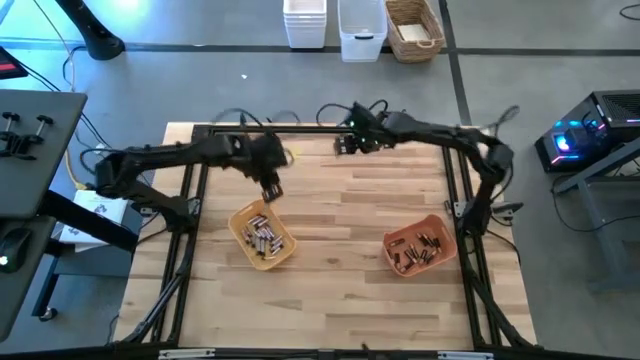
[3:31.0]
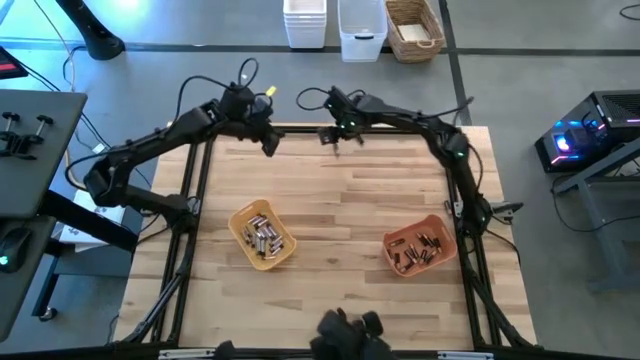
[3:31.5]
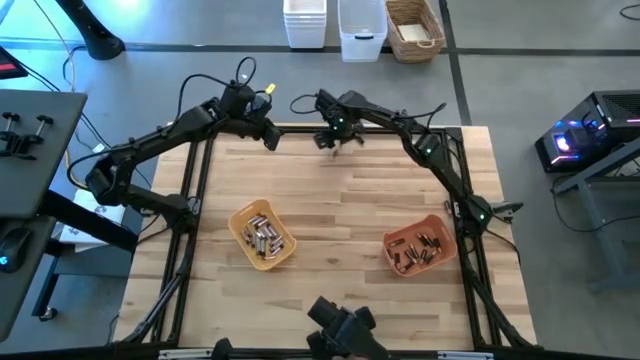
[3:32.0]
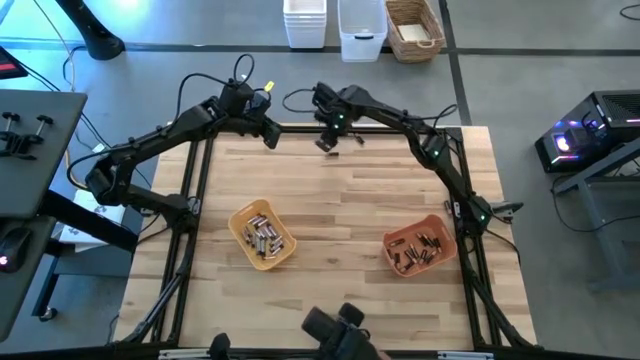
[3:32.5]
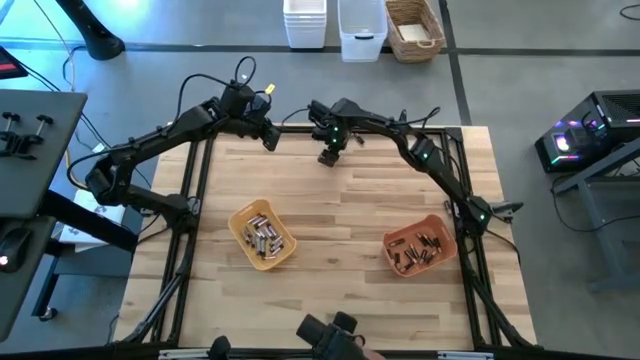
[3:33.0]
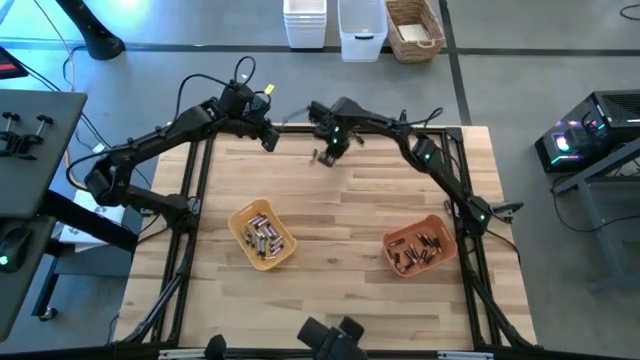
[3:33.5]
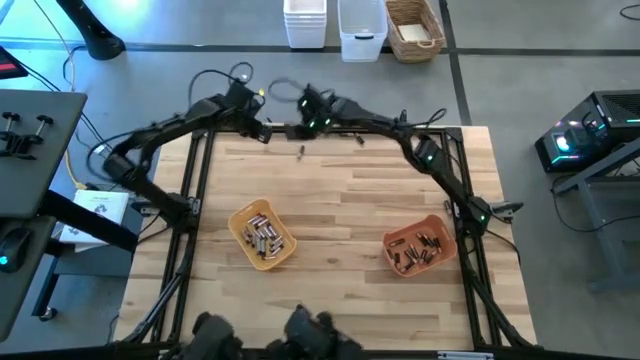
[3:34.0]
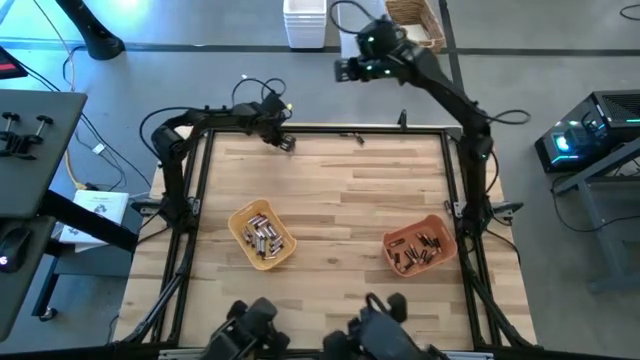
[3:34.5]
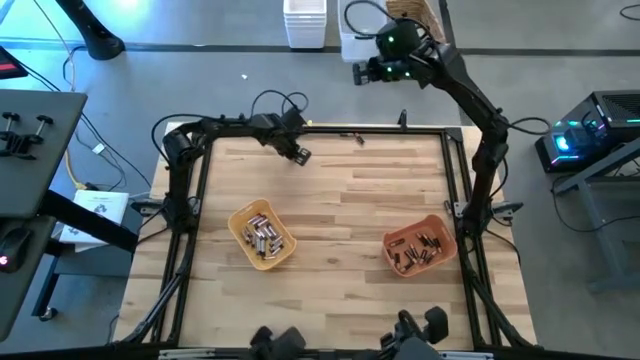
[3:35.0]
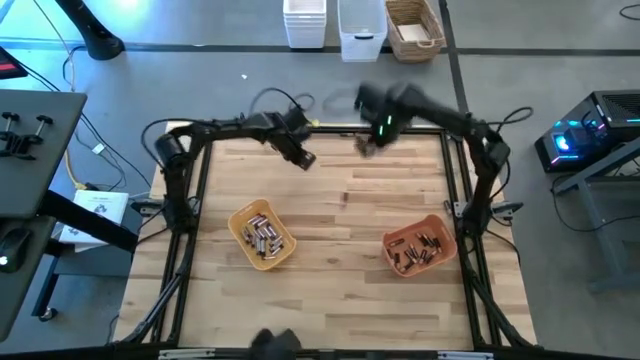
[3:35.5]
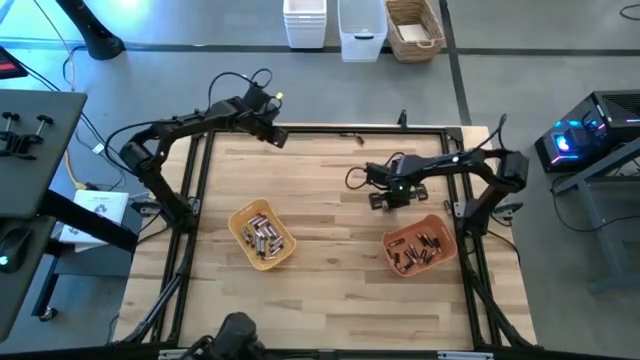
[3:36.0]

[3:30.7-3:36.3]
Task: Sort batteries
Put the black battery into the orange bin

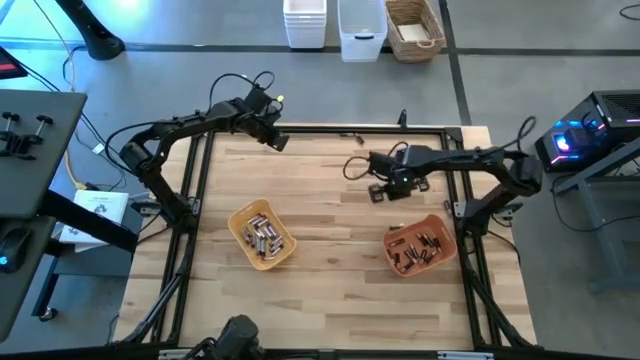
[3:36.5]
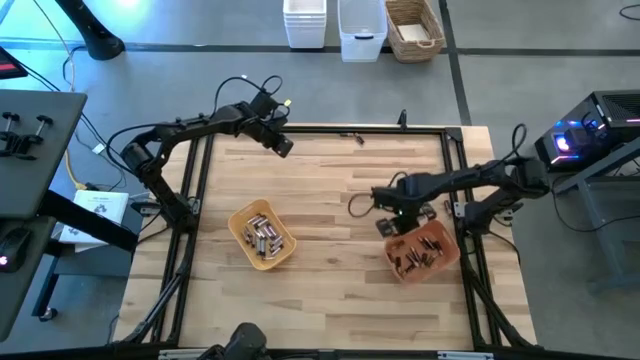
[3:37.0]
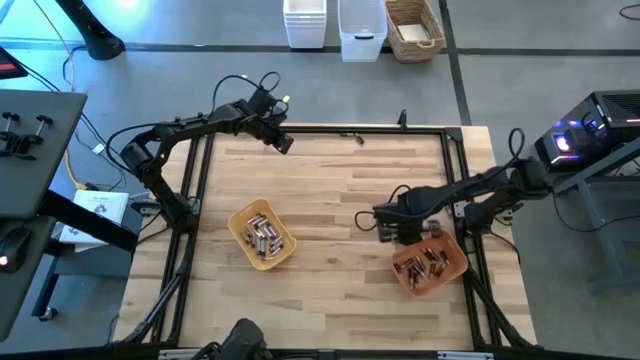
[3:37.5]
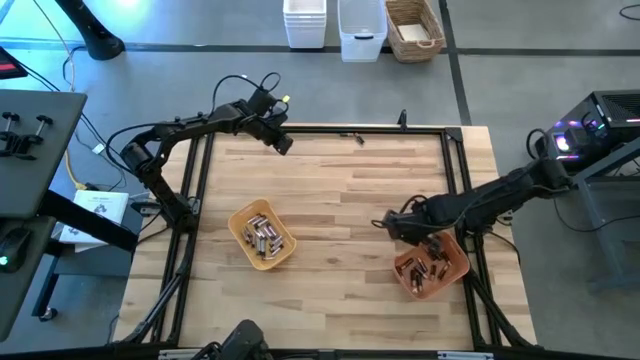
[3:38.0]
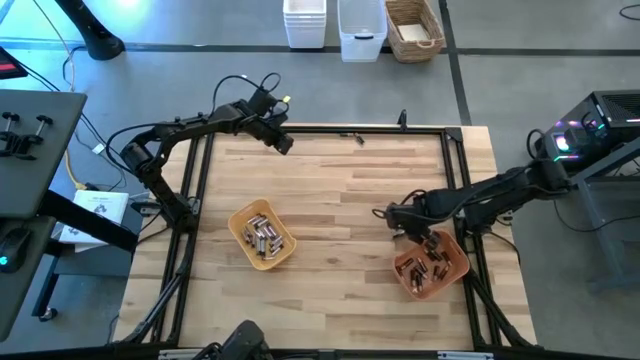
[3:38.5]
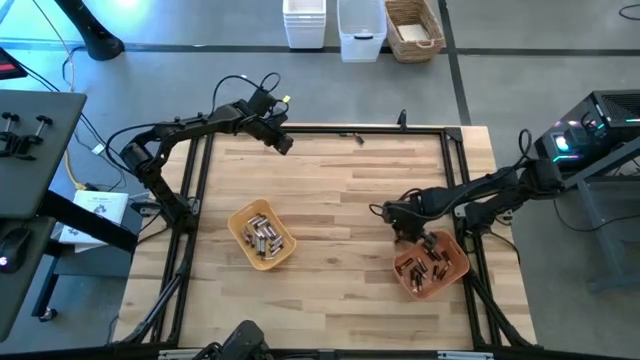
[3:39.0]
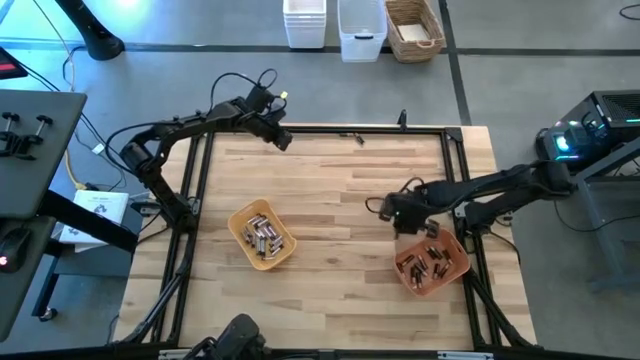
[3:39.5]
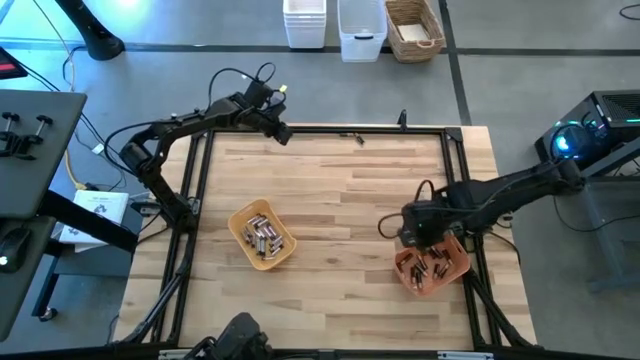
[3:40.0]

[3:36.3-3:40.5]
Put the black battery into the orange bin

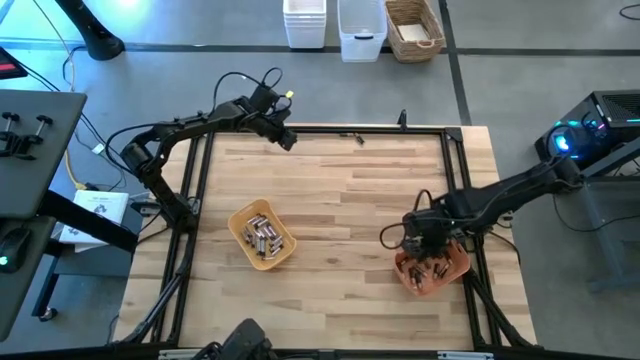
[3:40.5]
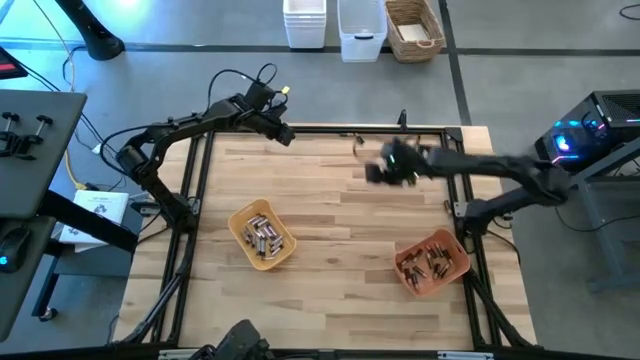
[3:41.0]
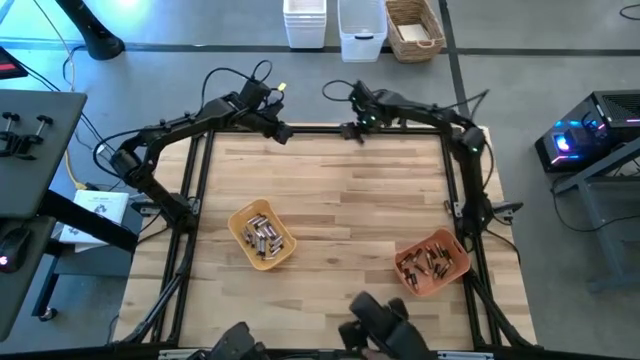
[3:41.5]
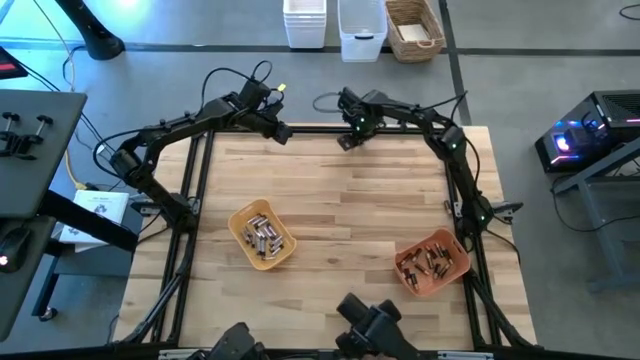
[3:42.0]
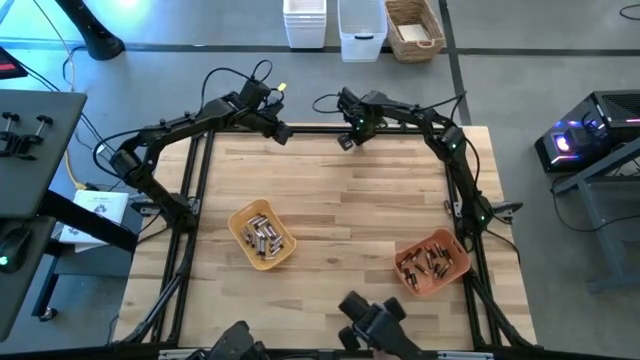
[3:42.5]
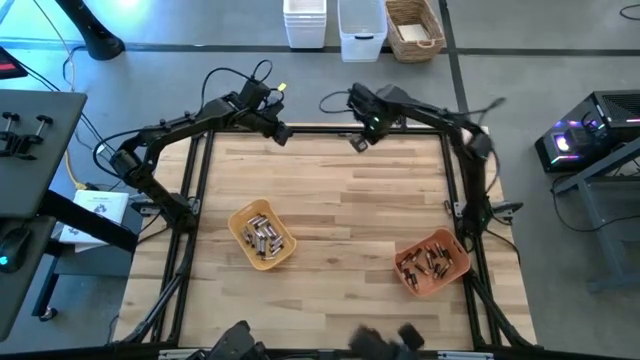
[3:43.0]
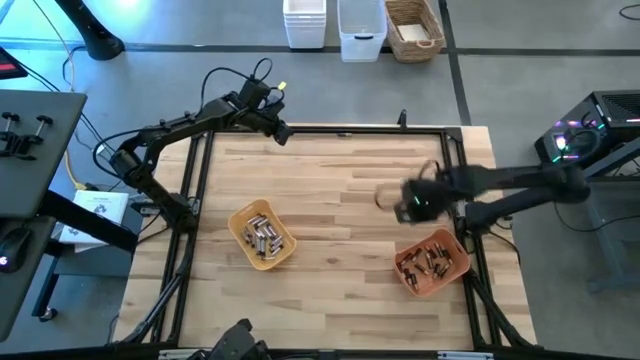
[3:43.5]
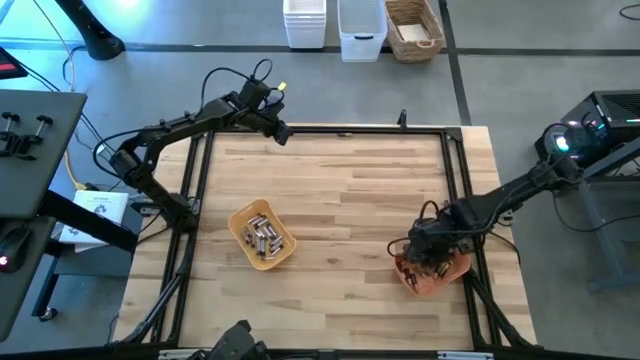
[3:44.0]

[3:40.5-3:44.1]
Put the black battery into the orange bin

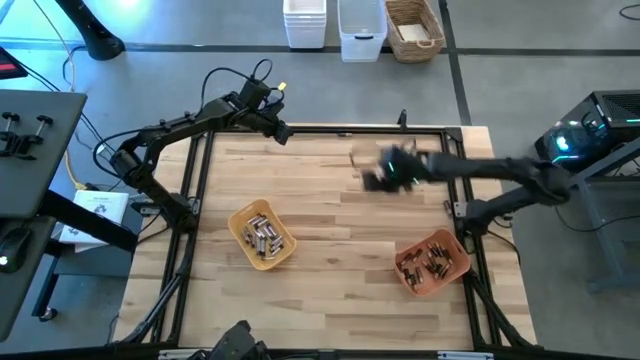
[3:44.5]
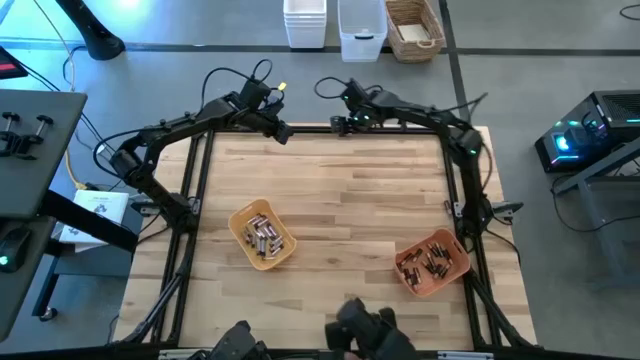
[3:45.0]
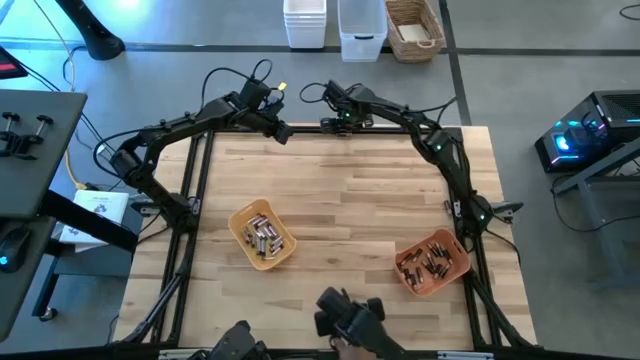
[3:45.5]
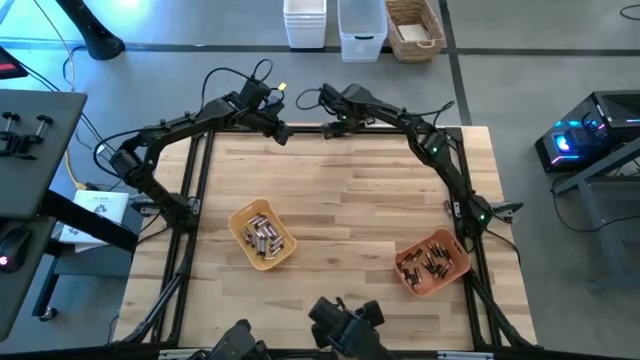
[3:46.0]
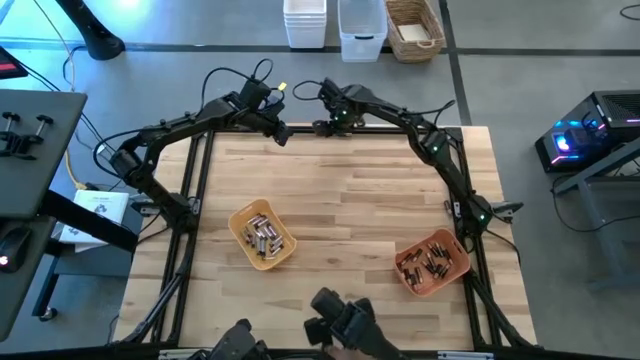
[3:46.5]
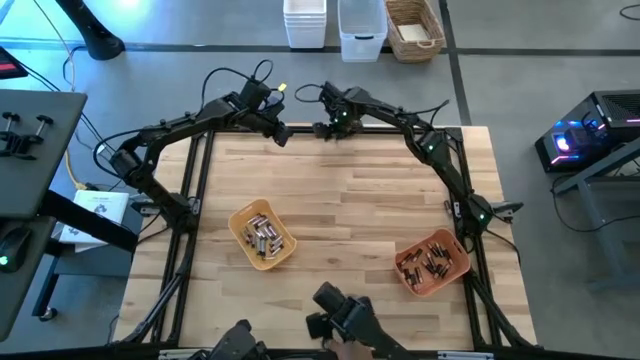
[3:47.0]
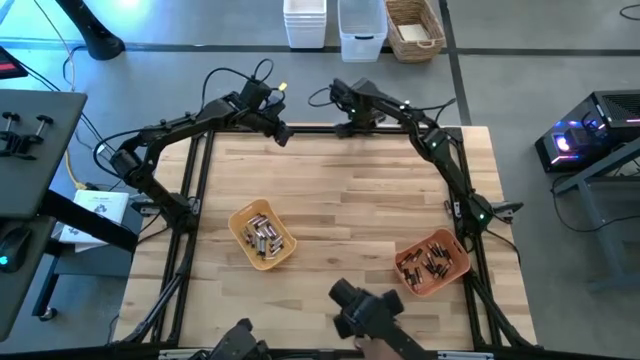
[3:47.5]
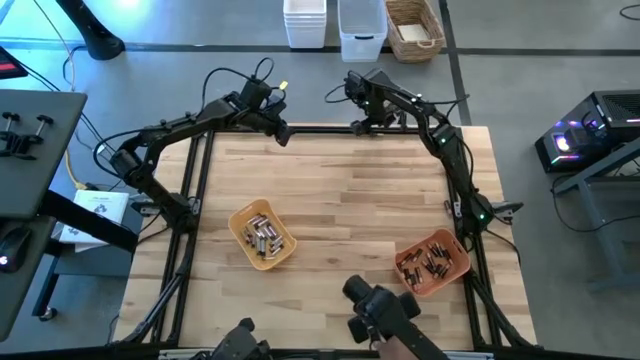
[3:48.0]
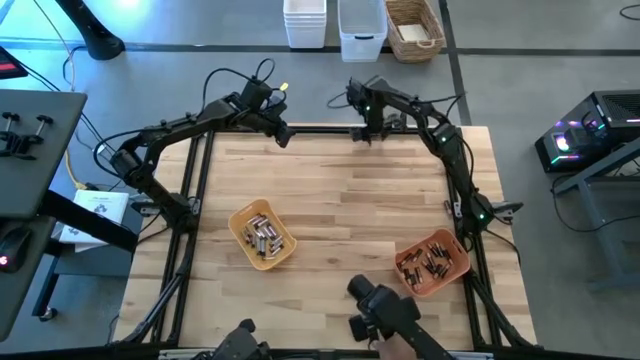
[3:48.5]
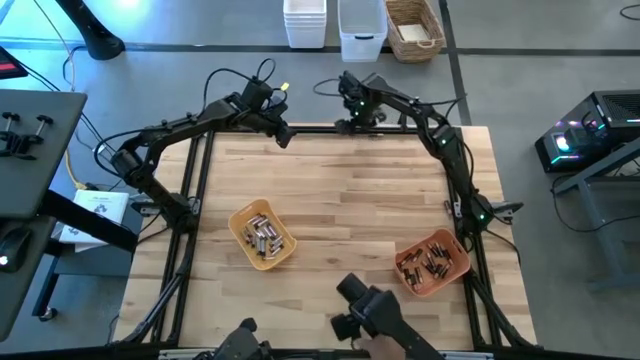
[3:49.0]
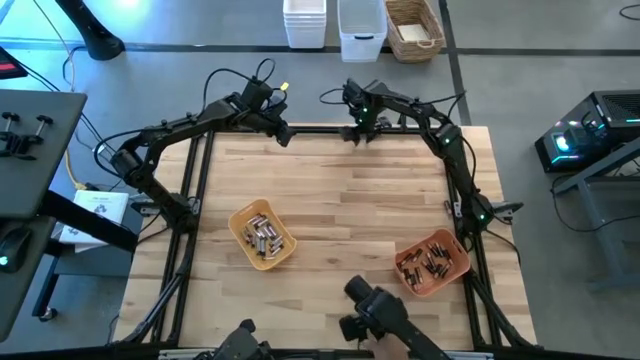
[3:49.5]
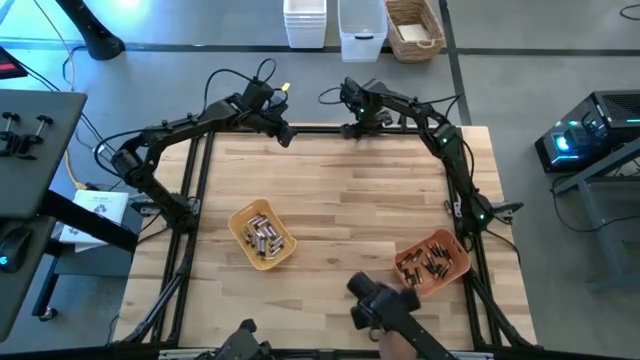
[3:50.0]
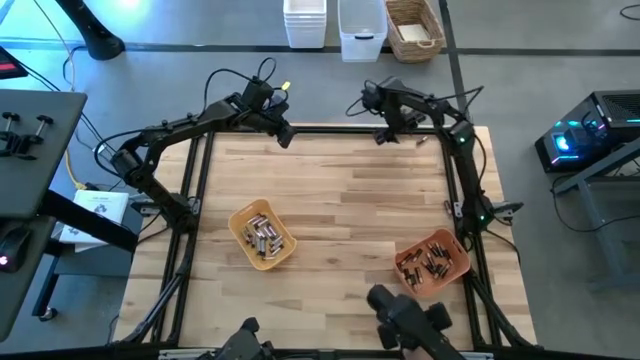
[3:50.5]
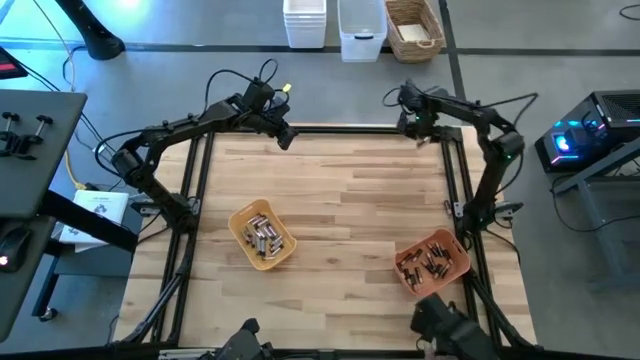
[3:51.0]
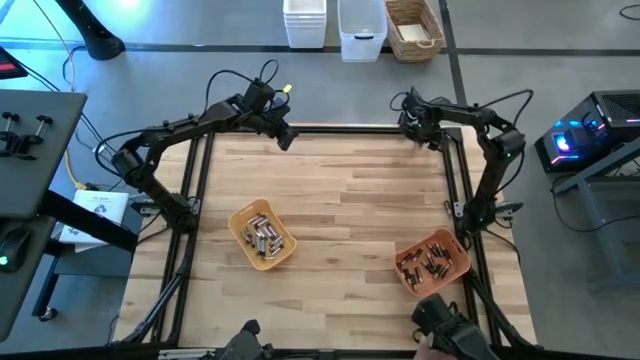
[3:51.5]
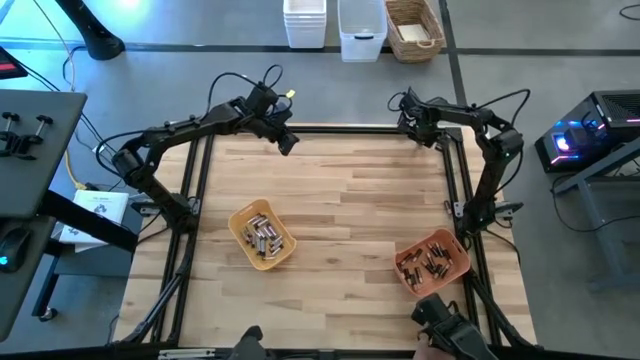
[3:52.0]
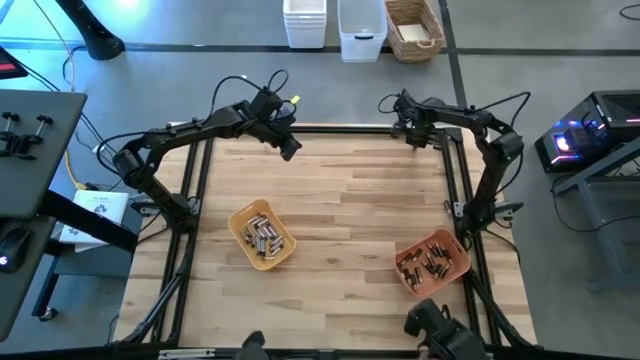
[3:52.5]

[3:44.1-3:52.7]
Put the black battery into the orange bin
